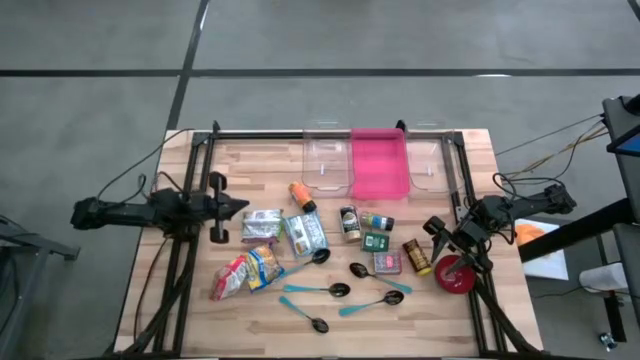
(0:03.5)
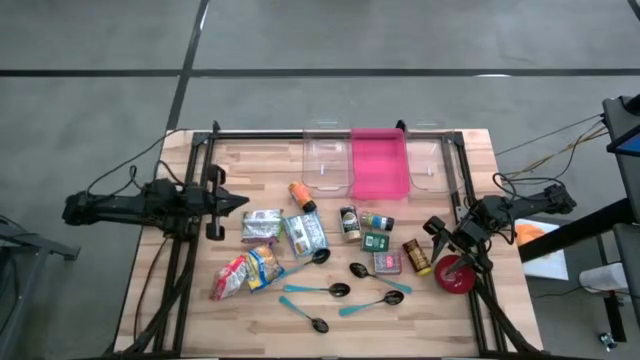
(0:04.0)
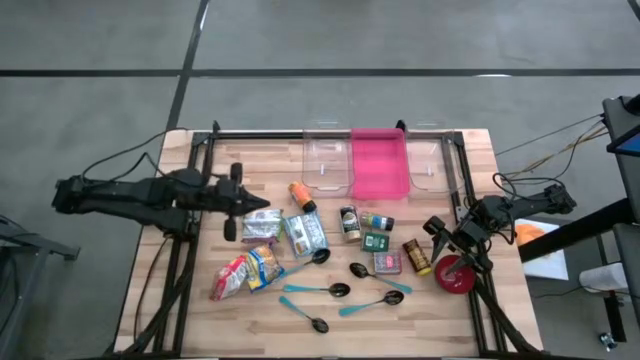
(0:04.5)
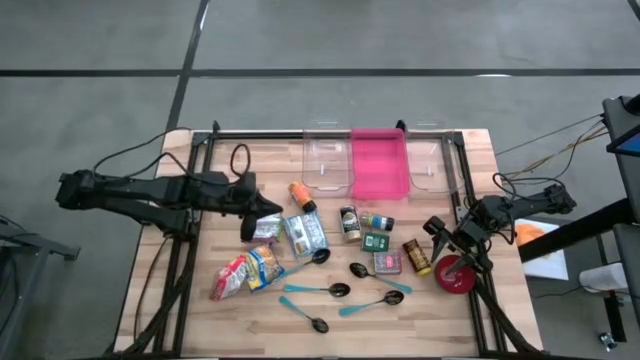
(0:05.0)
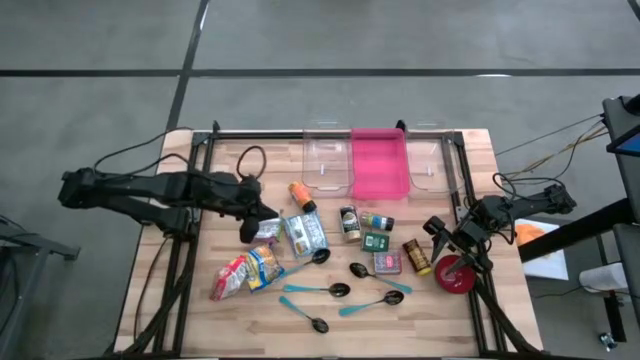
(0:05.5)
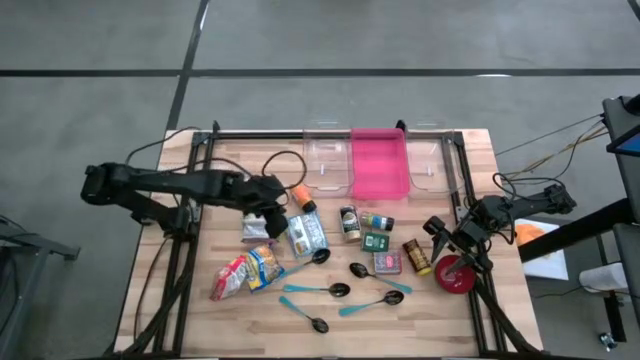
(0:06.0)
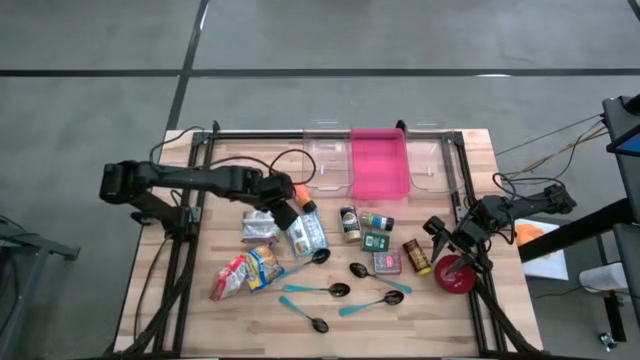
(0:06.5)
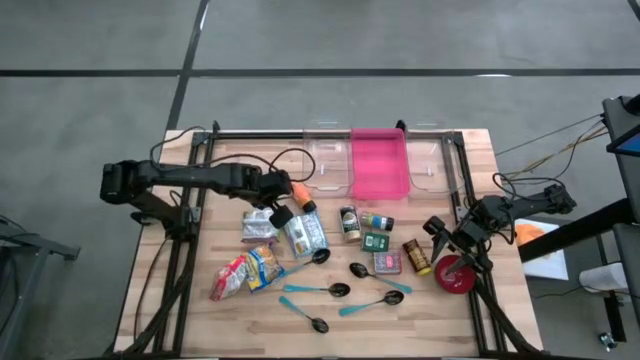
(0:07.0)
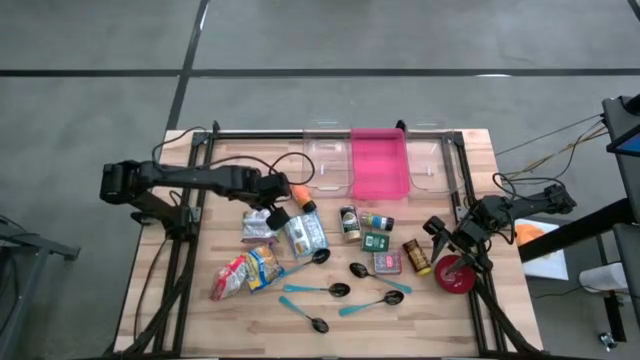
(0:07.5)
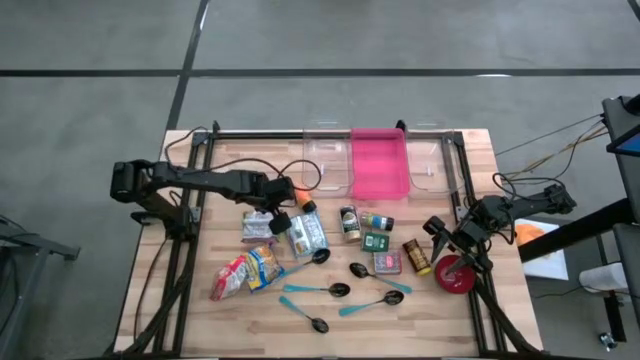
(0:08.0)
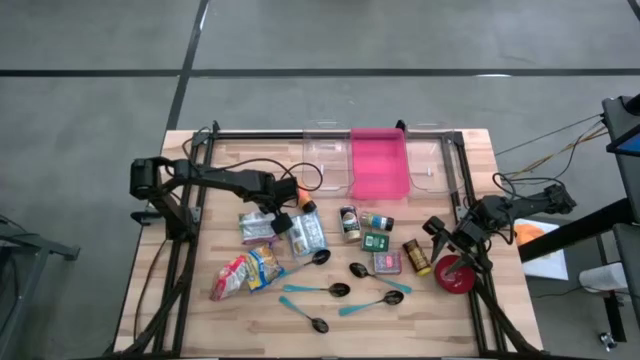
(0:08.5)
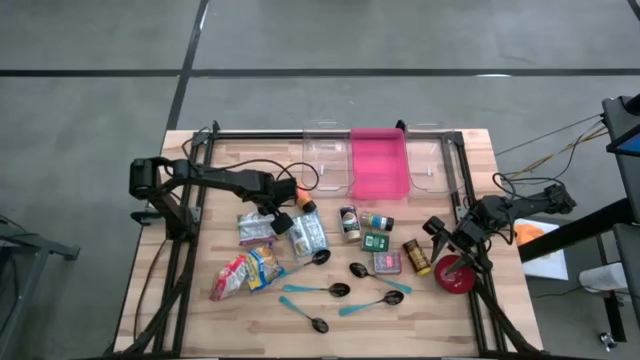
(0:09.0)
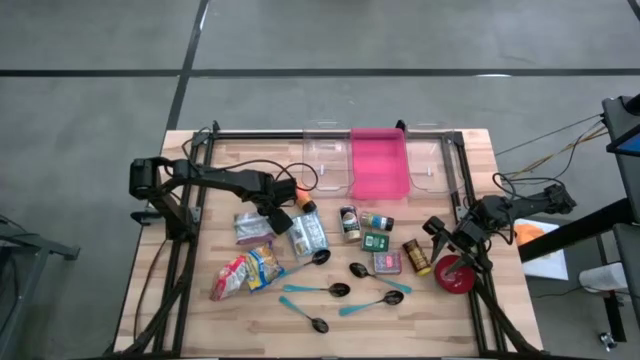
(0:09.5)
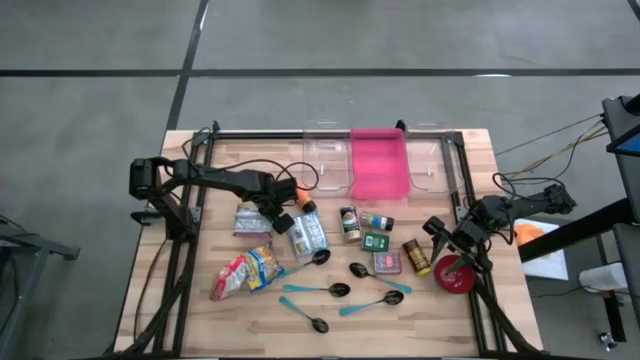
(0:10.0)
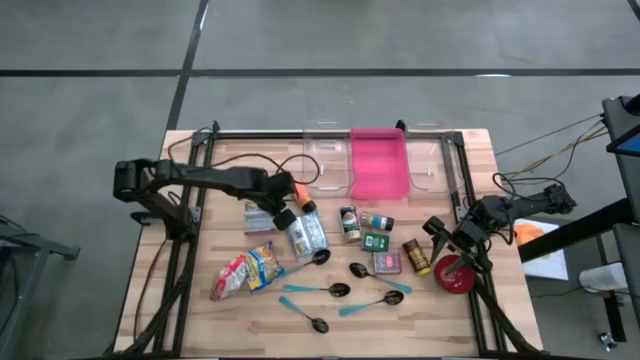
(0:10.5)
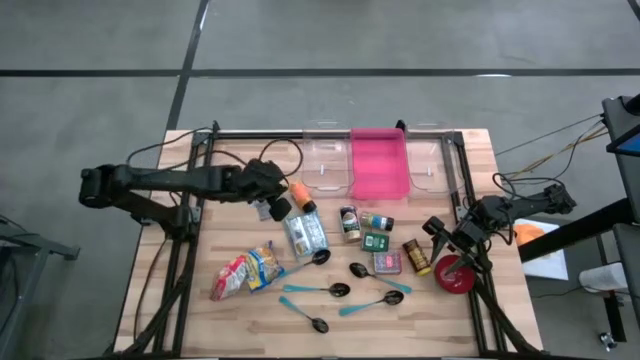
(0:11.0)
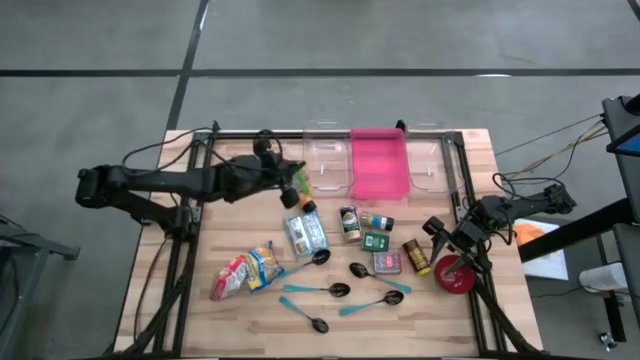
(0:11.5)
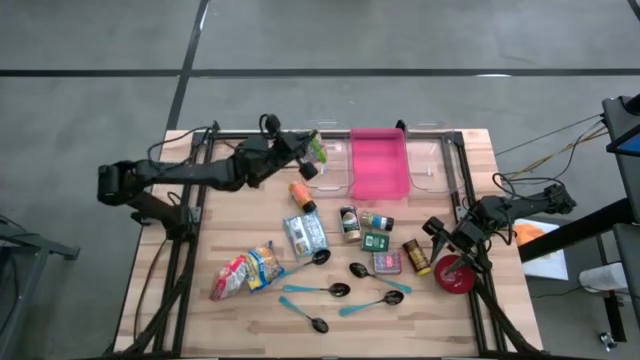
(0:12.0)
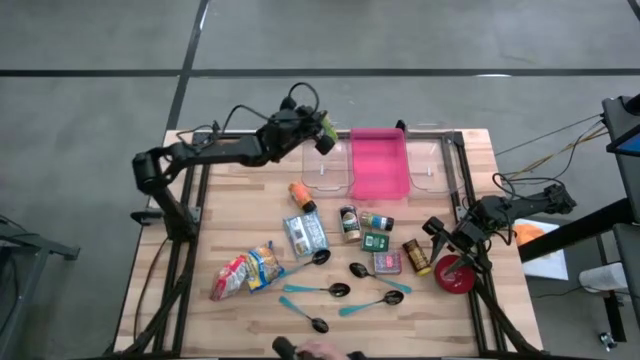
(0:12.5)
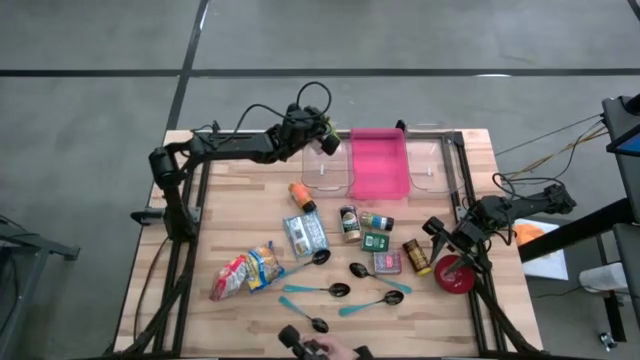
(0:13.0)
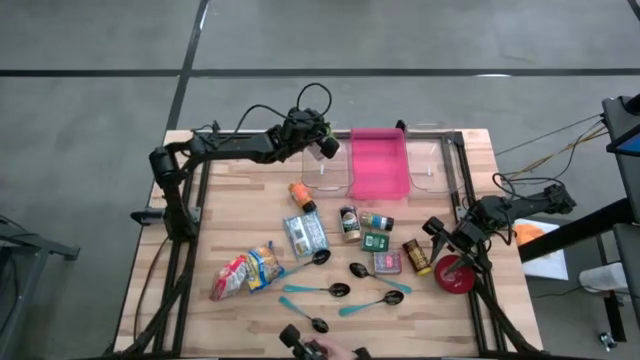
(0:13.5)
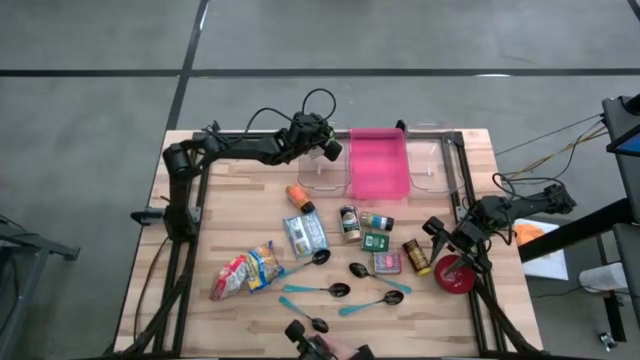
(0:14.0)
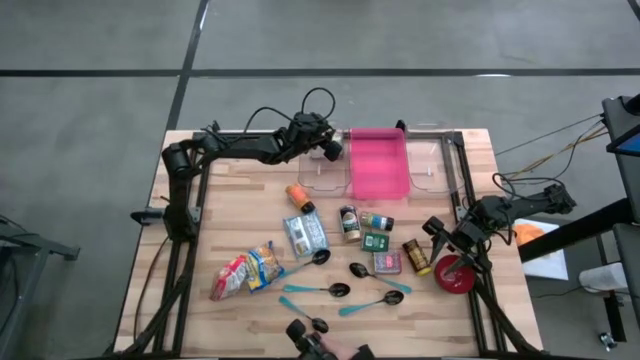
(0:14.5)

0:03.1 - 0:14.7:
Put the green noodle pack into the left transparent bin

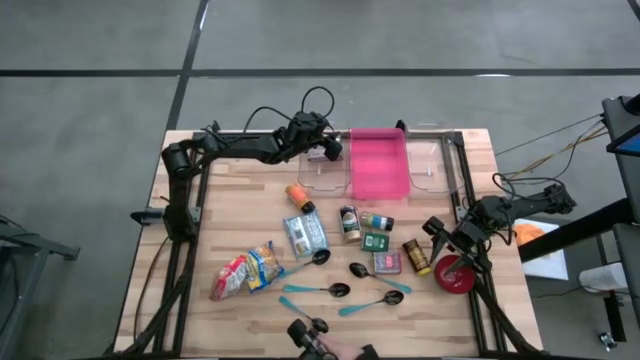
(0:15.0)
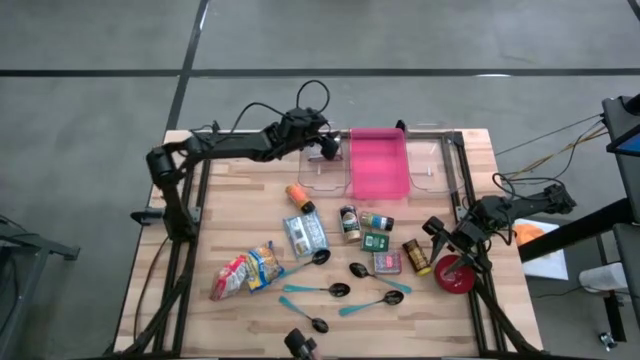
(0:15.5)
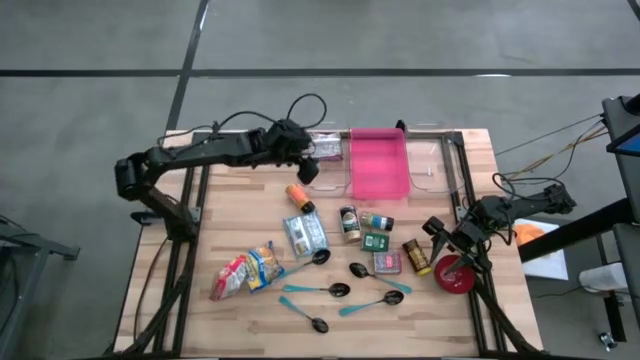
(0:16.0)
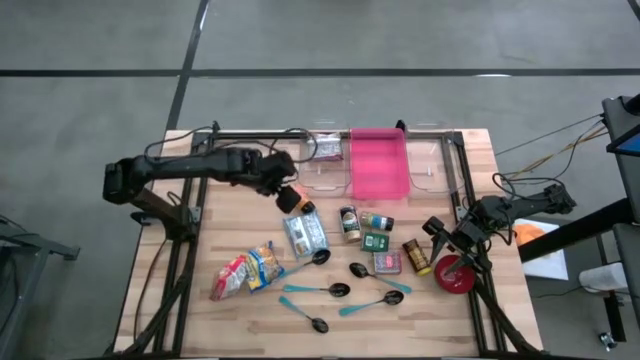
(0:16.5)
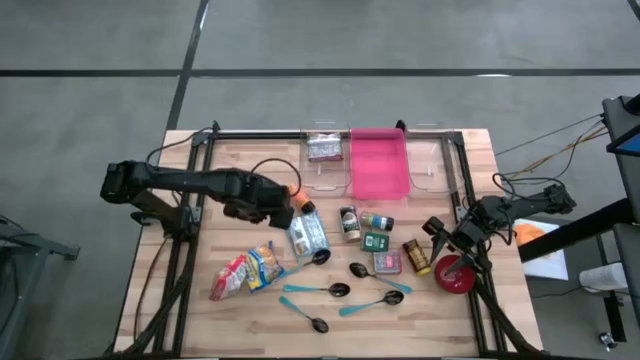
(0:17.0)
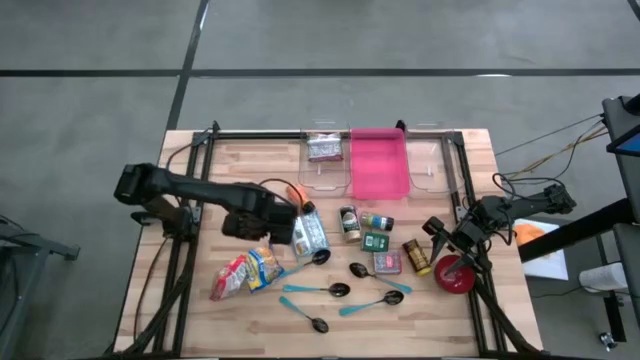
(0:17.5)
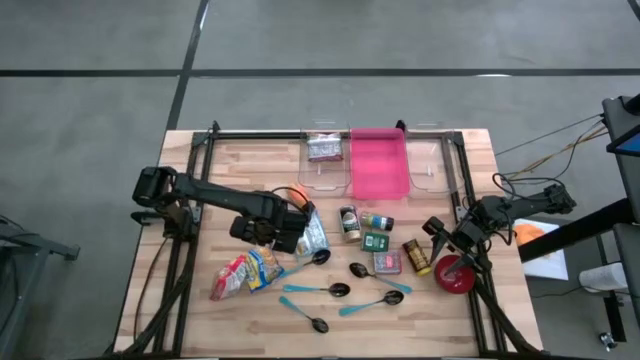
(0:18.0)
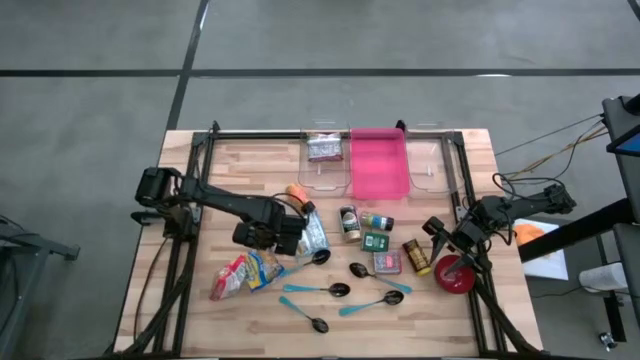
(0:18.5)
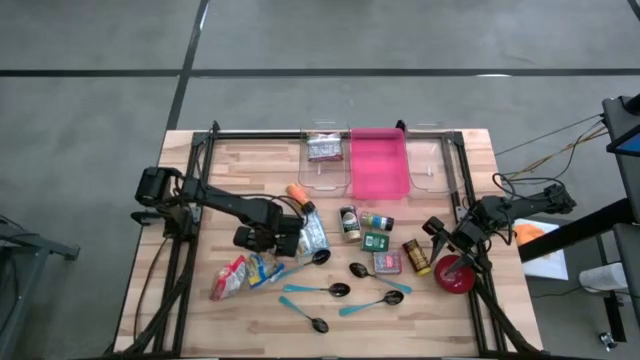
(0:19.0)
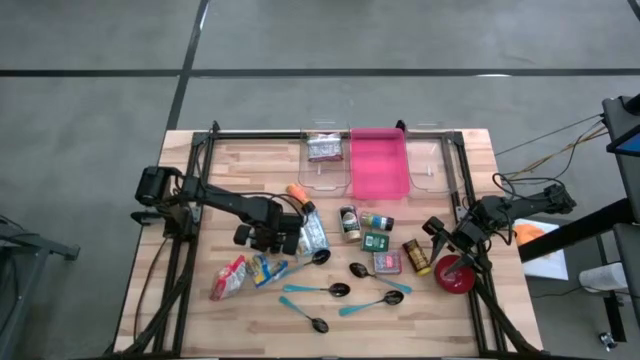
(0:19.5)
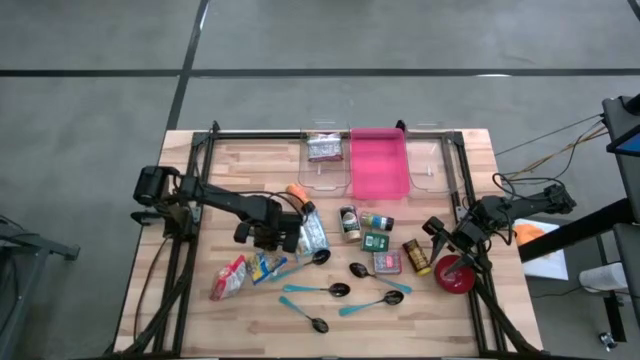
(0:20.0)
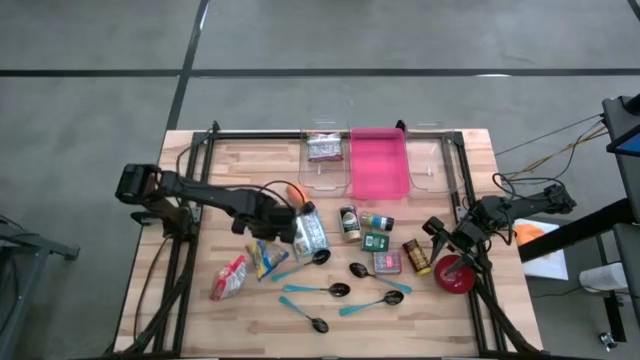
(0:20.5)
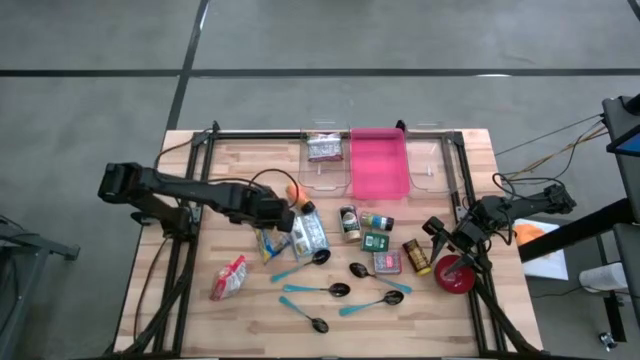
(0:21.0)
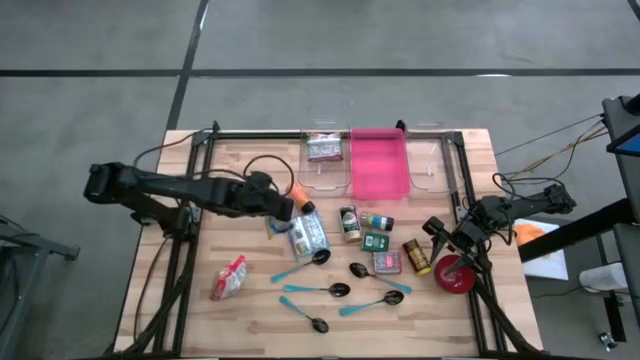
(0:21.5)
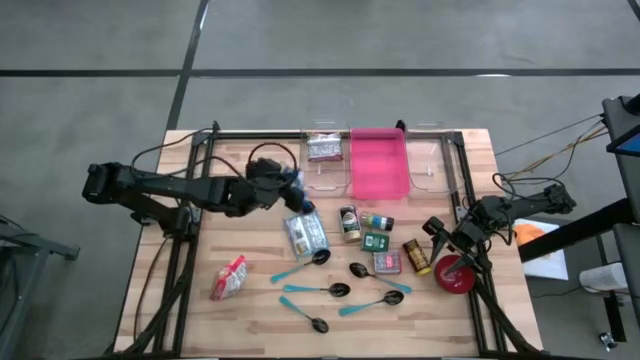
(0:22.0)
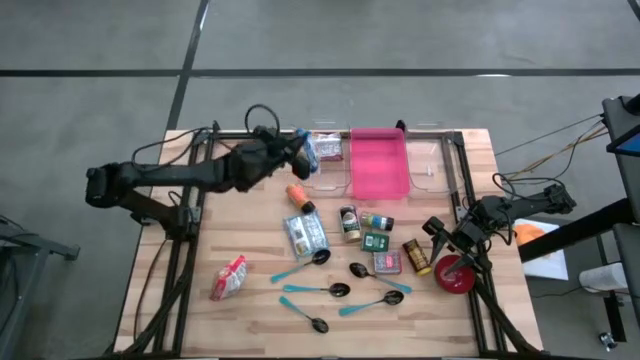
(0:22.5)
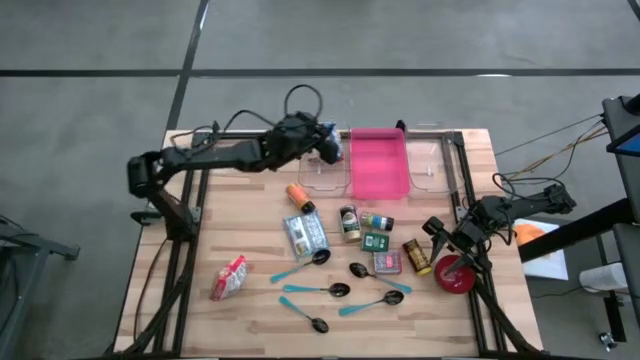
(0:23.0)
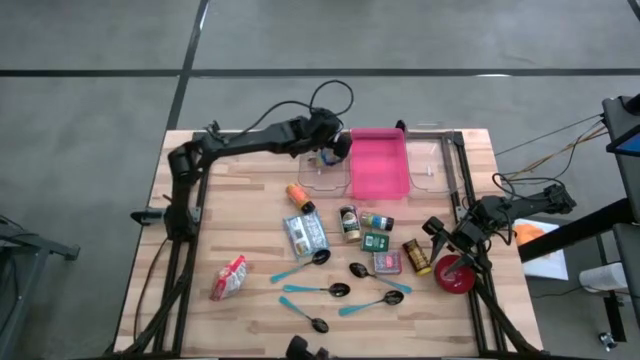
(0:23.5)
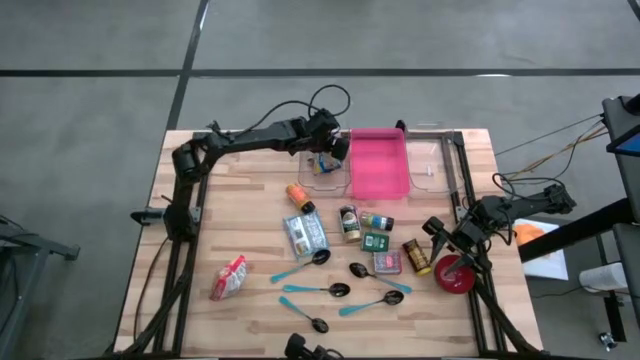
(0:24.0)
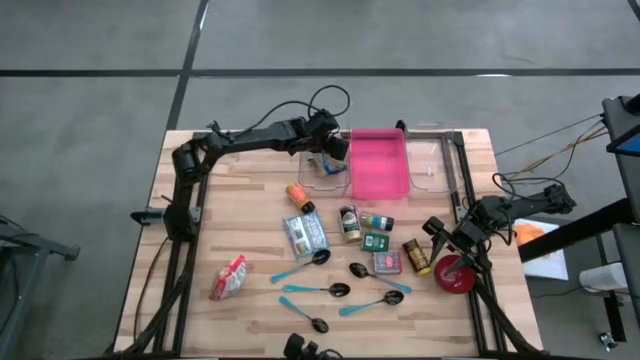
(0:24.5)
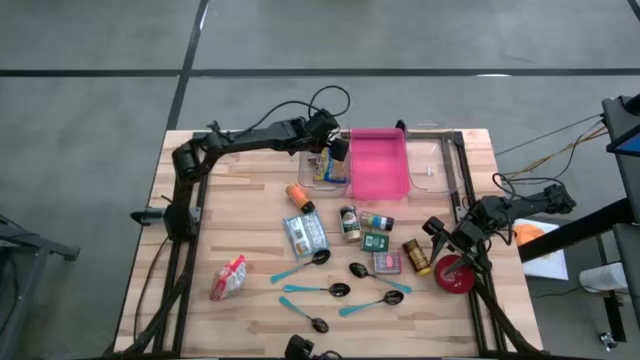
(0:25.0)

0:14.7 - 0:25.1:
Put the dark blue noodle pack into the left transparent bin
